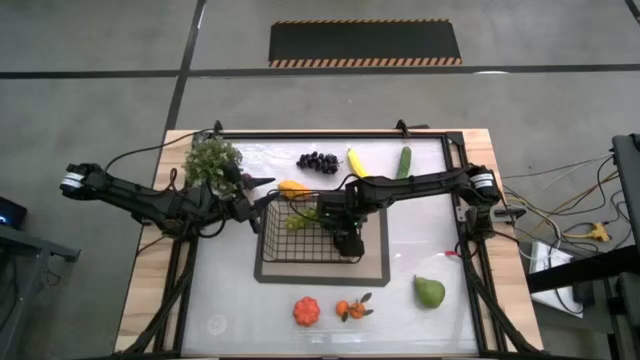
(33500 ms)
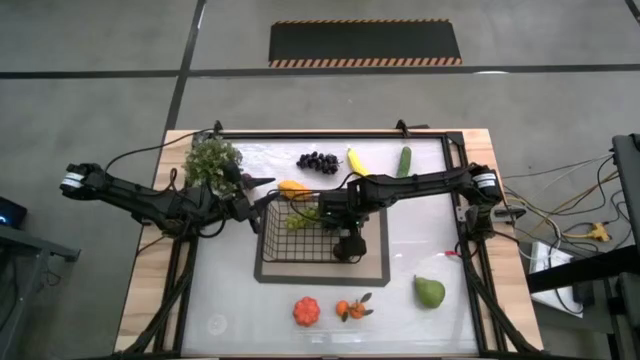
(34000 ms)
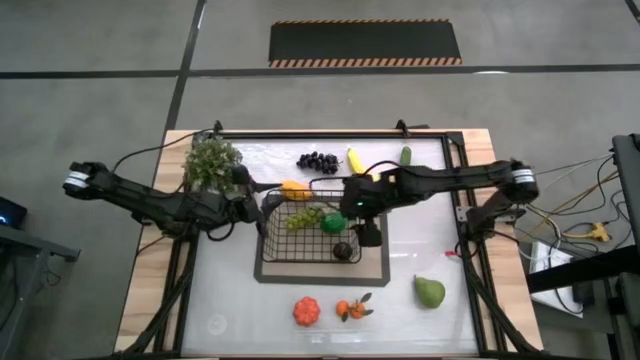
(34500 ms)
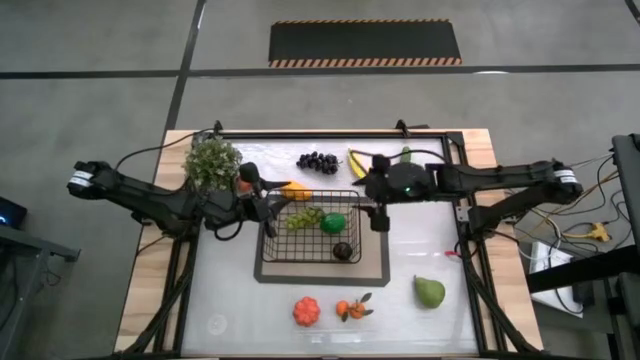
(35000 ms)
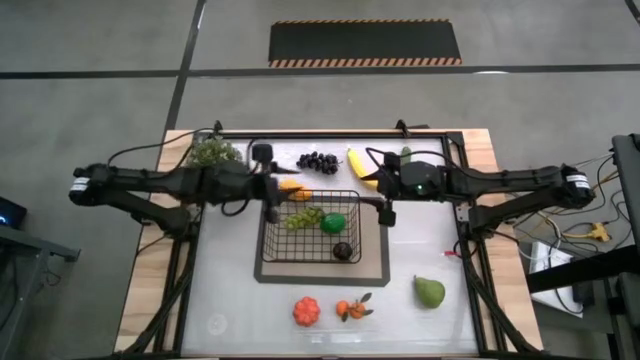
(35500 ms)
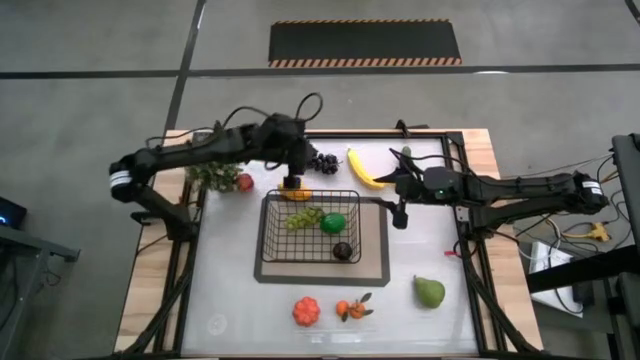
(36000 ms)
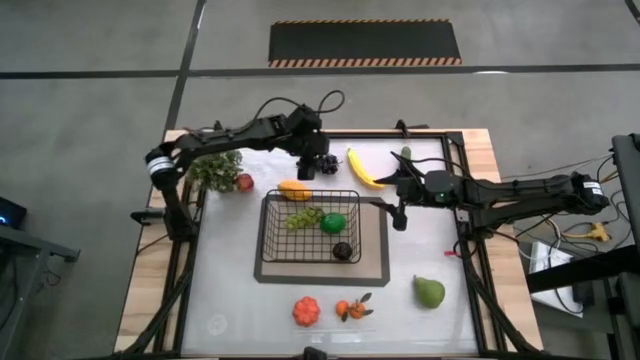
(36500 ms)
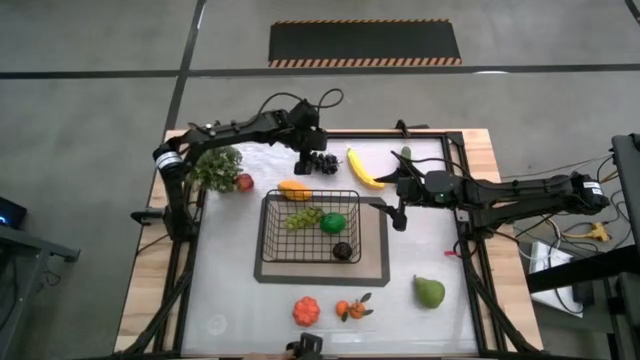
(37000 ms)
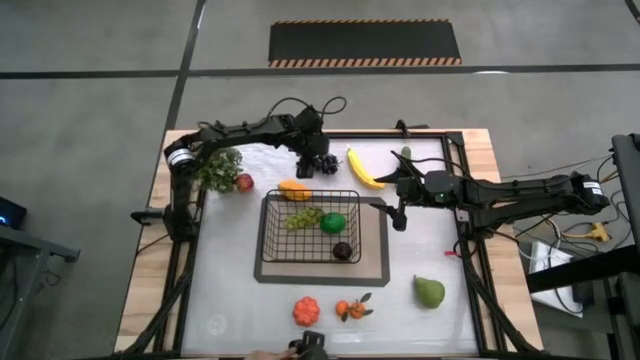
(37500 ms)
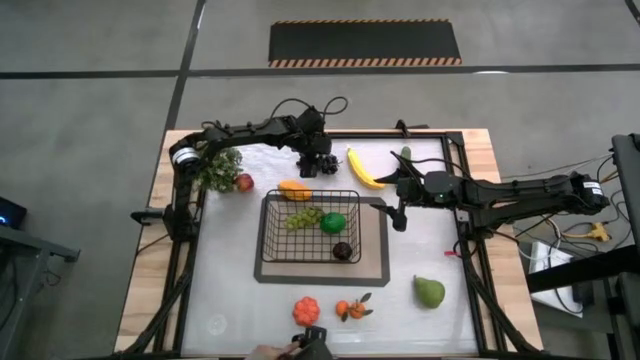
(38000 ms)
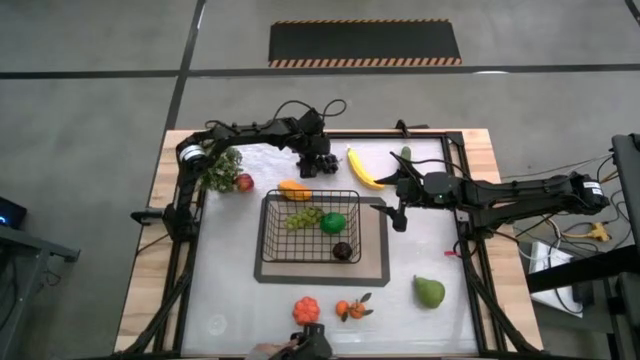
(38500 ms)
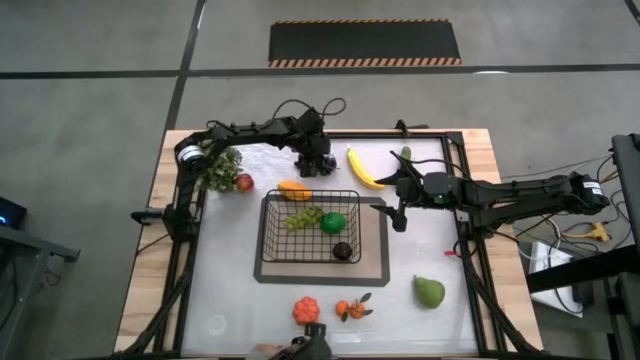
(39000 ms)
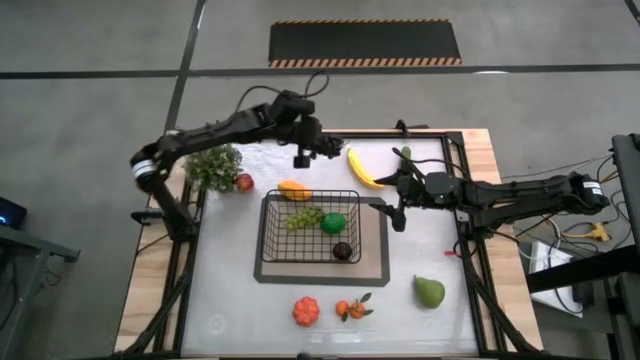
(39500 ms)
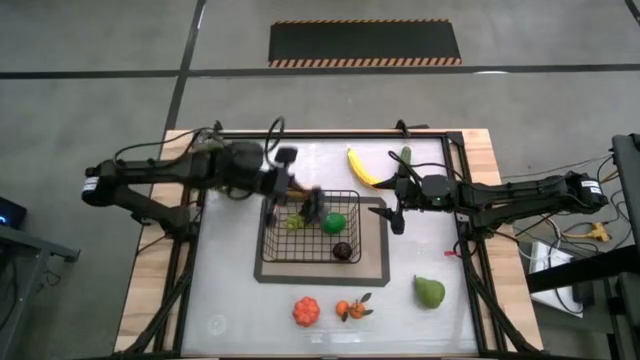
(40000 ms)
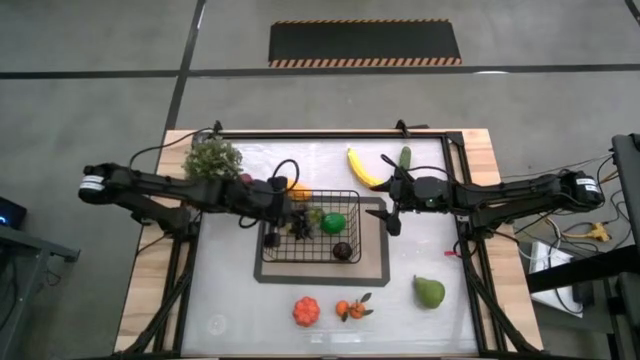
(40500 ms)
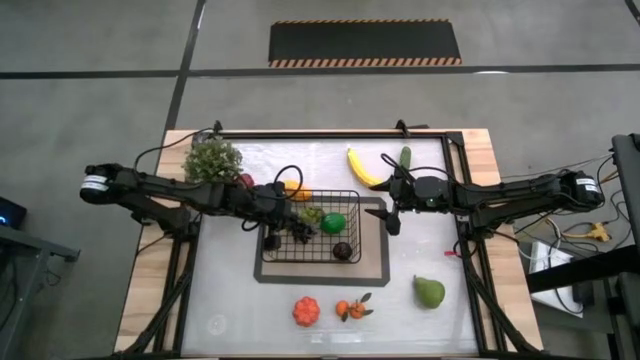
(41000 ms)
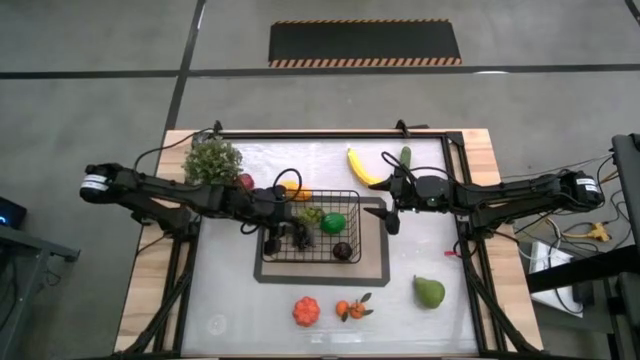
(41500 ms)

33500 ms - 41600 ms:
Task: Build produce basket
Put the black grapes into the black wire basket

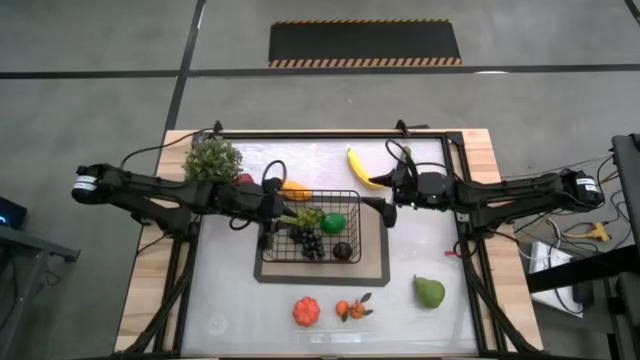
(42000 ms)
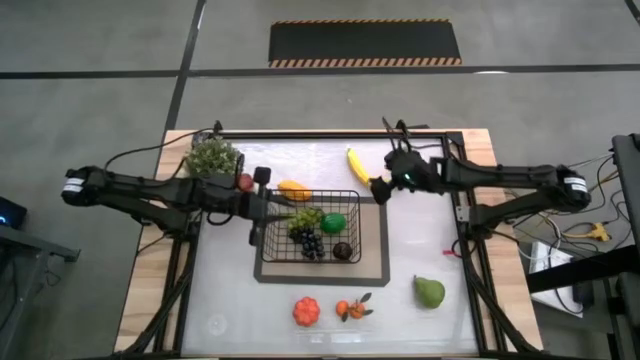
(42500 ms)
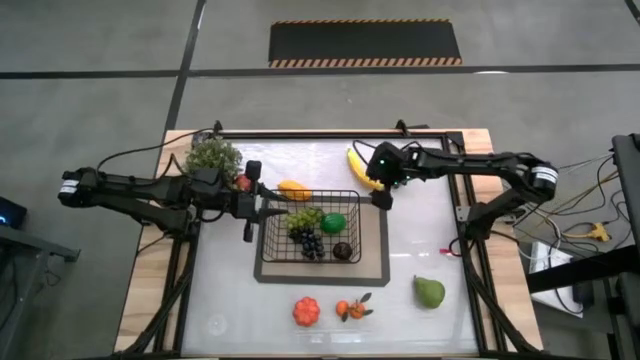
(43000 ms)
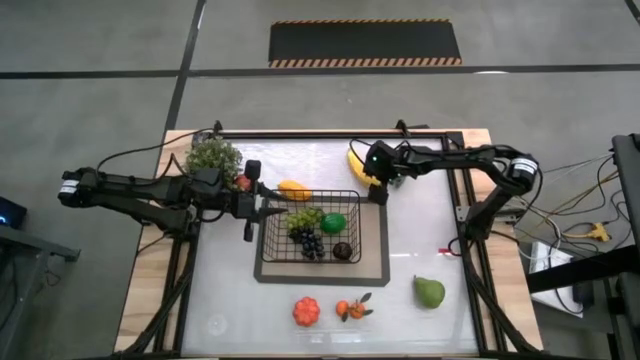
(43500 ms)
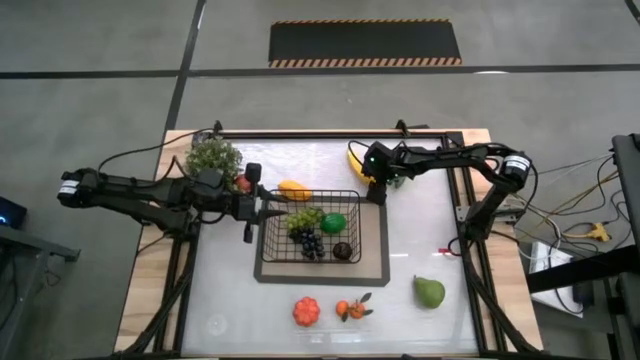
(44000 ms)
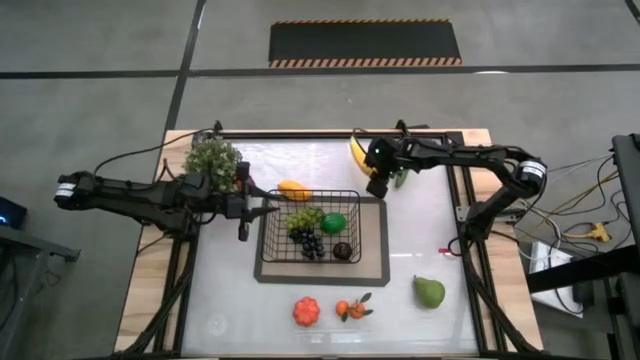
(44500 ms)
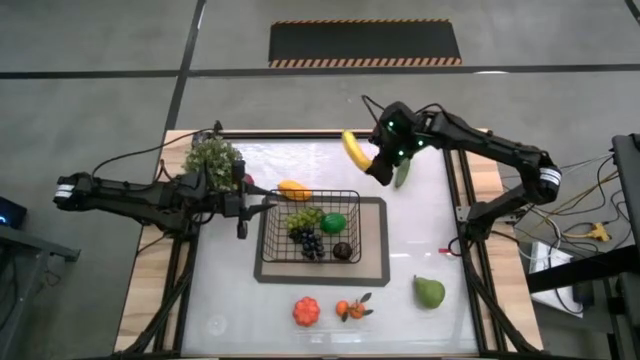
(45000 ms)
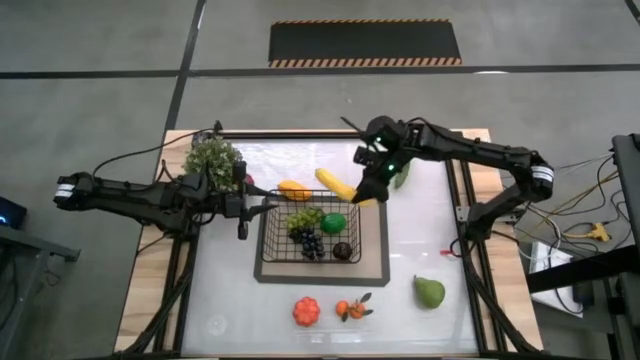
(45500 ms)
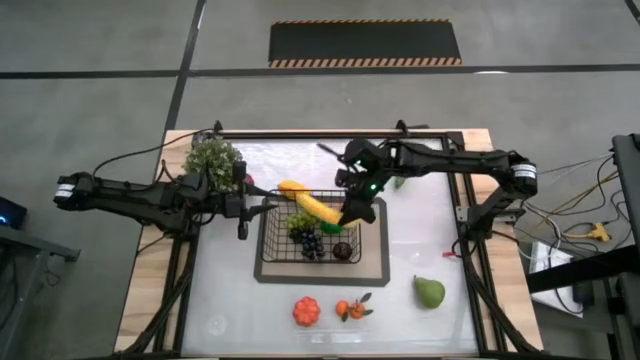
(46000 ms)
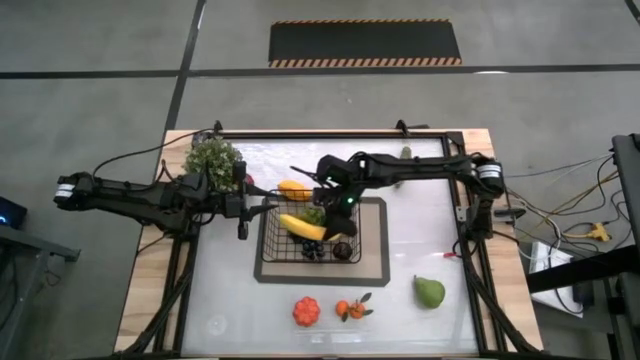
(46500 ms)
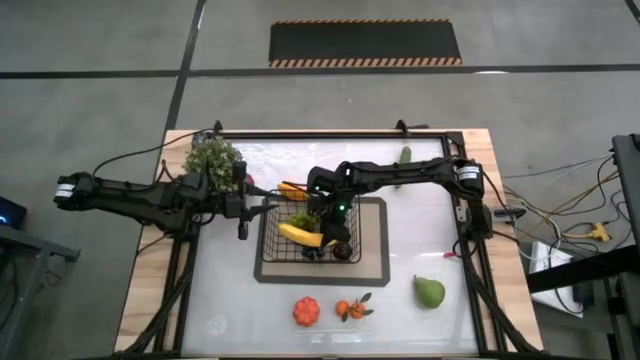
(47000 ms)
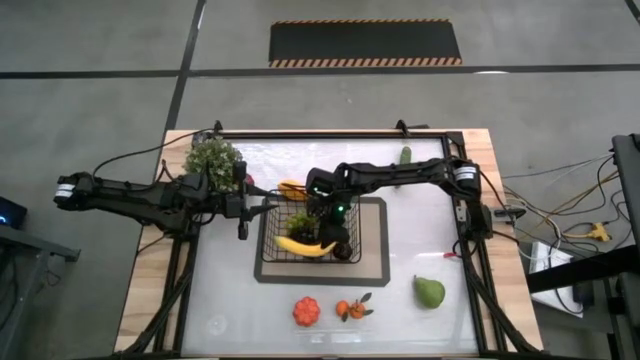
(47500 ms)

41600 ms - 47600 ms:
Put the yellow banana into the black wire basket

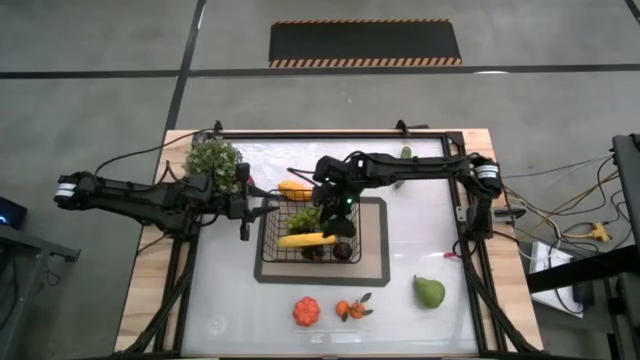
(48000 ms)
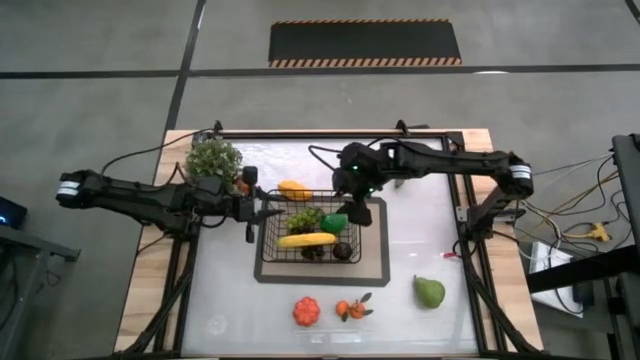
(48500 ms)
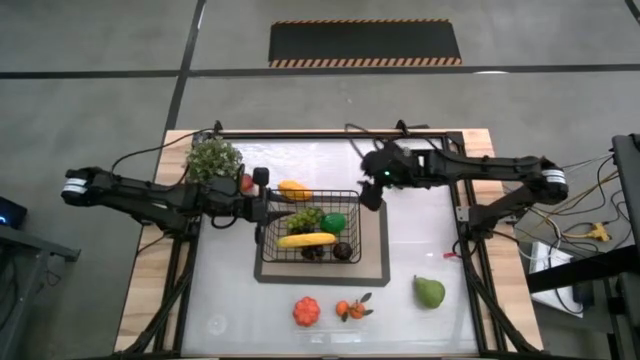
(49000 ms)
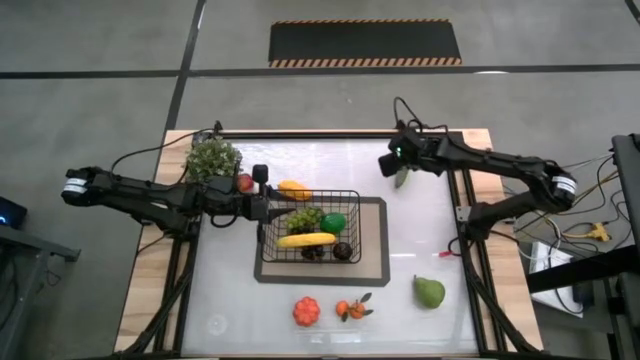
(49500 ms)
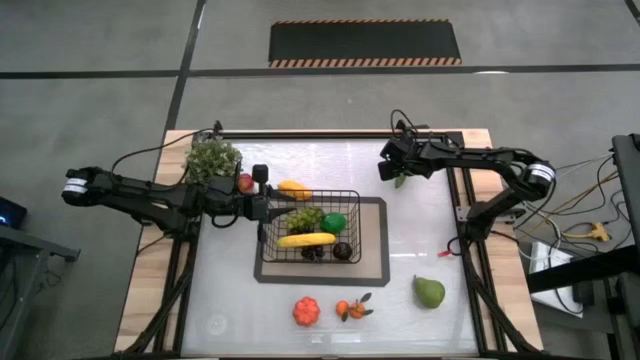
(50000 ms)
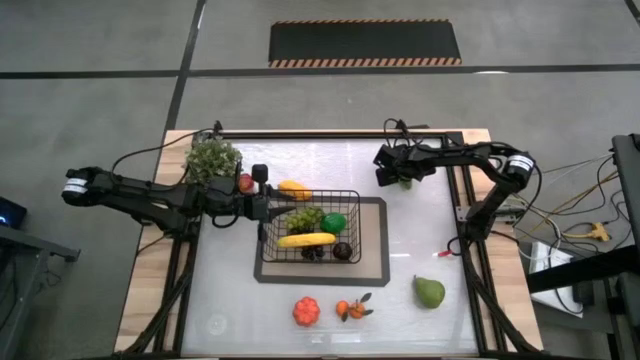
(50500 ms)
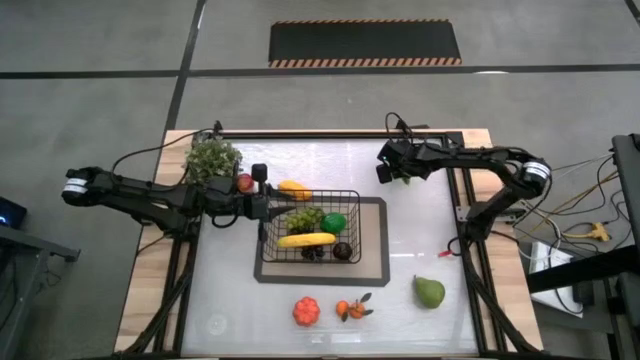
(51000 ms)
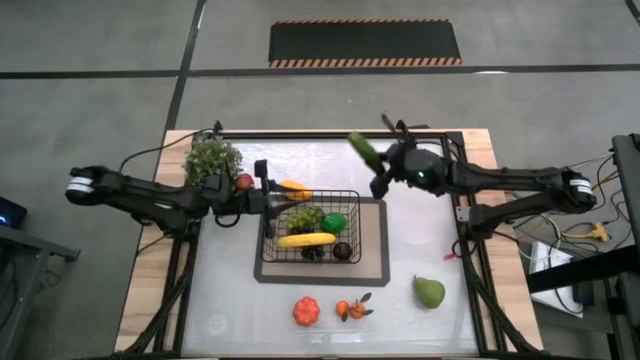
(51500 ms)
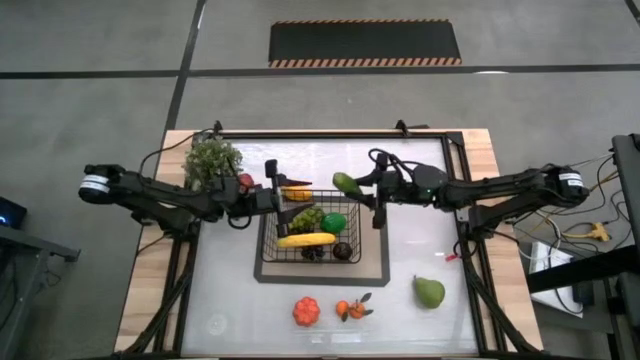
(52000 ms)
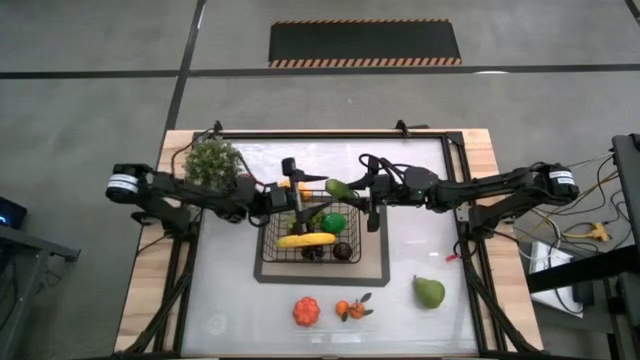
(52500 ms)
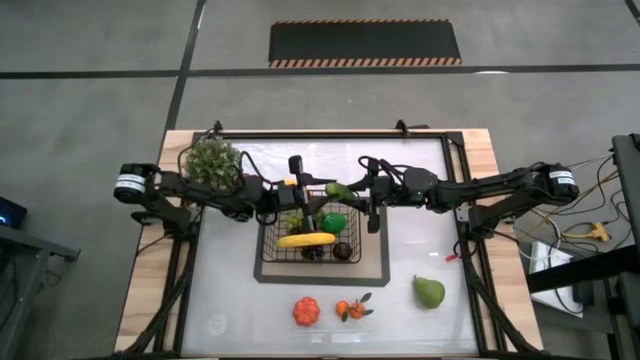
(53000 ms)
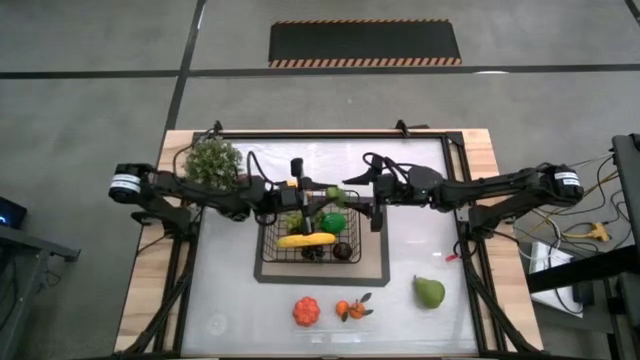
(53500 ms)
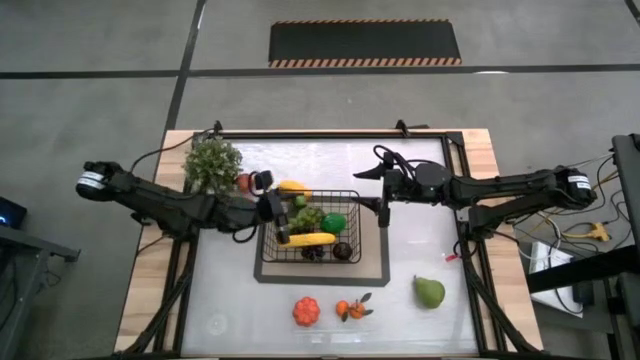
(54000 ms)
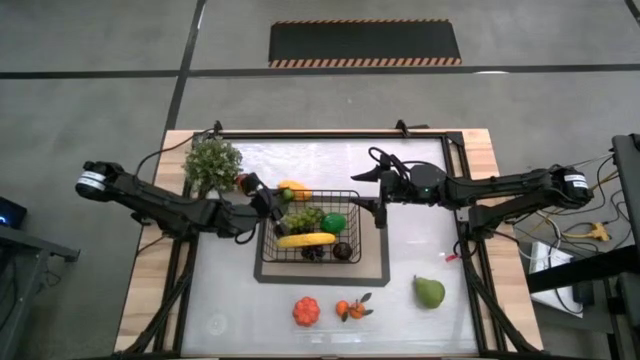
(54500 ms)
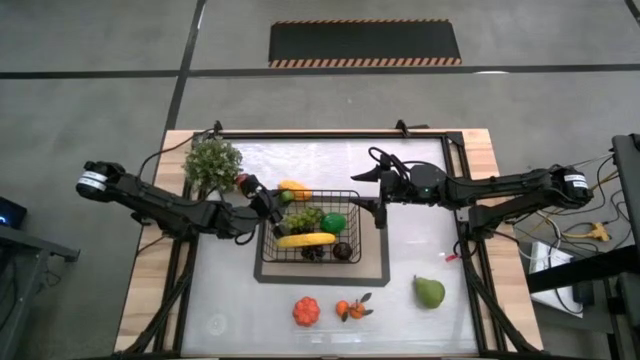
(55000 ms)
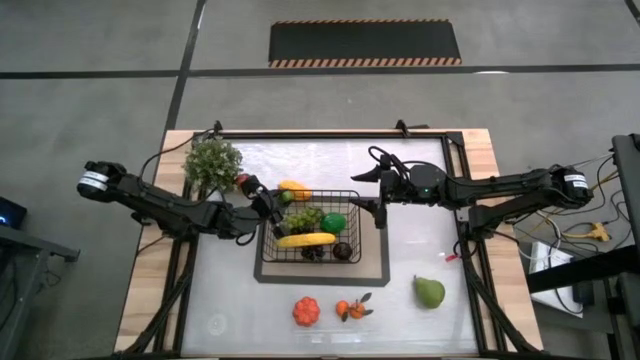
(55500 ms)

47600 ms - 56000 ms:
Put the green cucumber into the black wire basket
